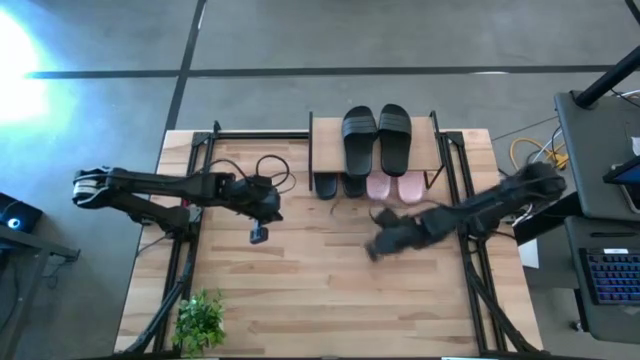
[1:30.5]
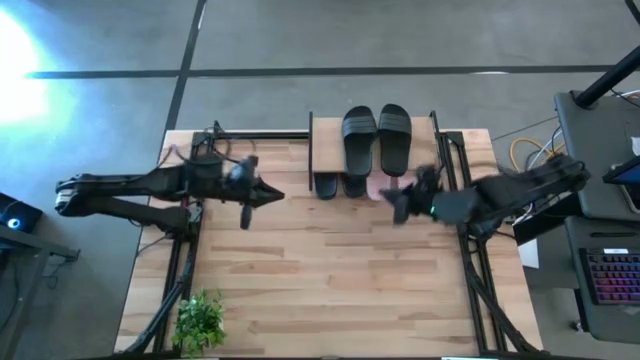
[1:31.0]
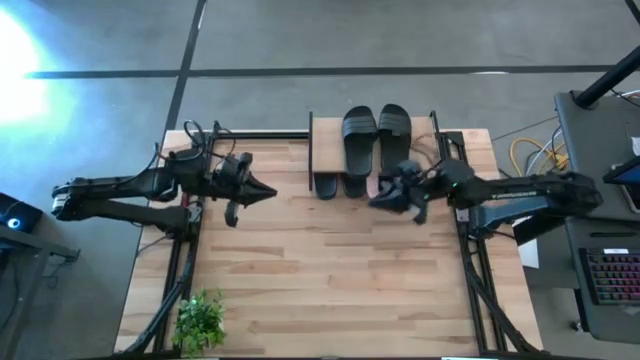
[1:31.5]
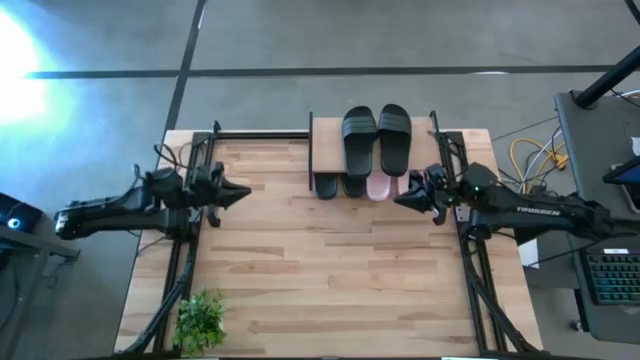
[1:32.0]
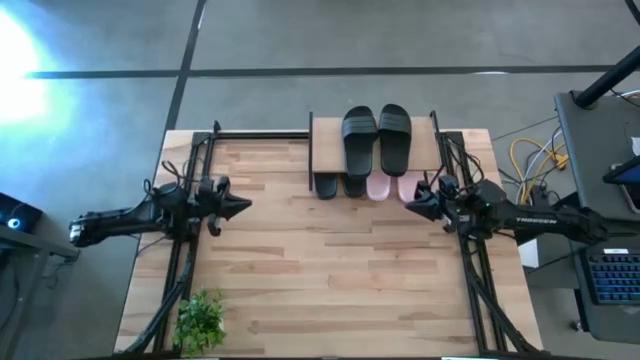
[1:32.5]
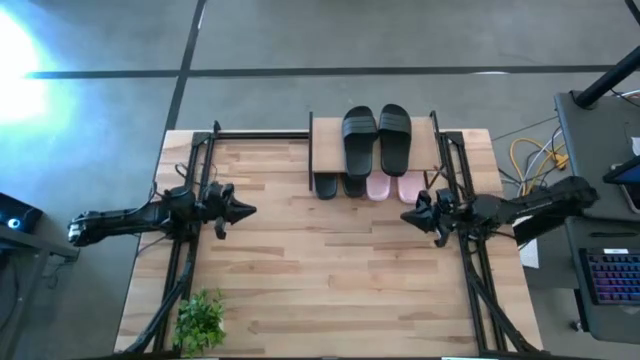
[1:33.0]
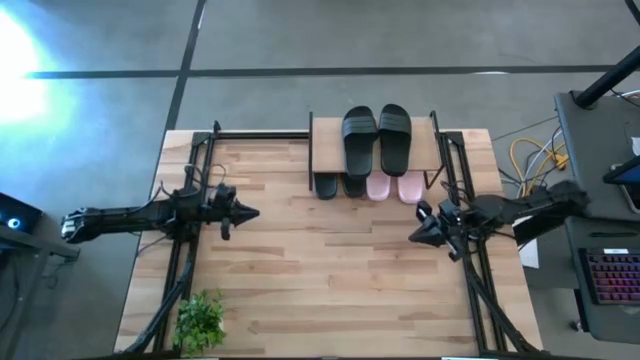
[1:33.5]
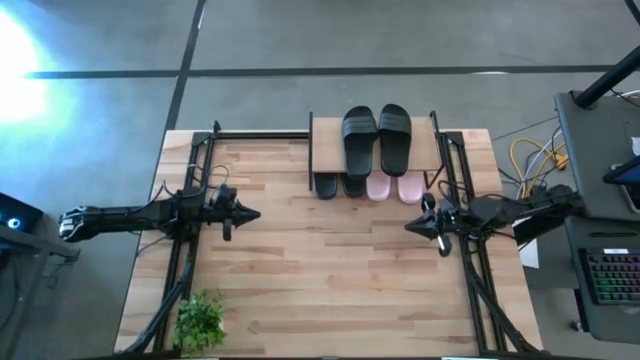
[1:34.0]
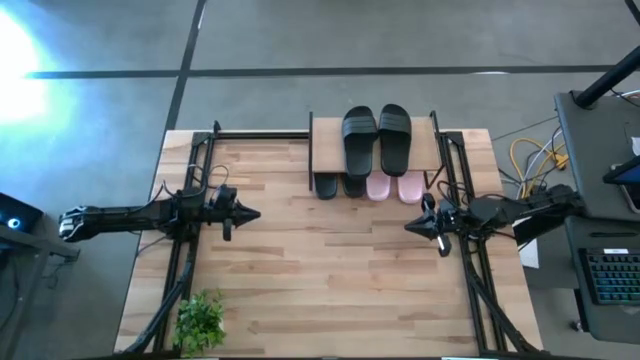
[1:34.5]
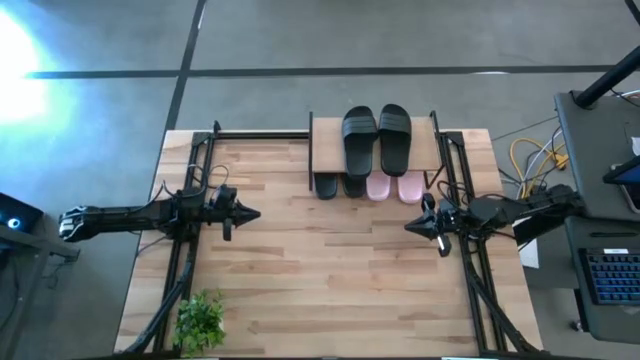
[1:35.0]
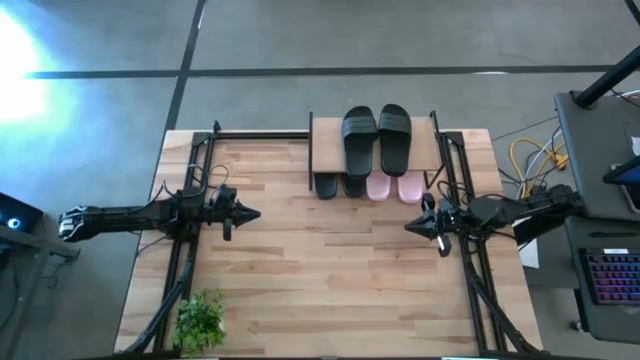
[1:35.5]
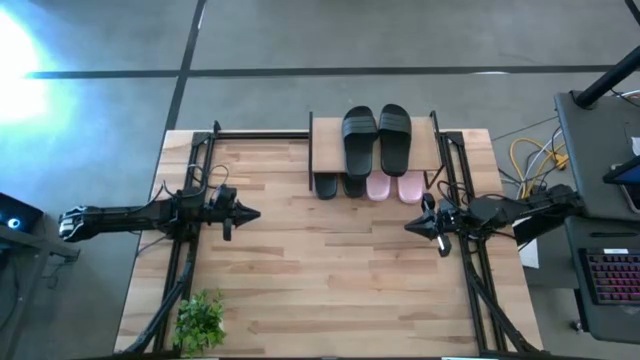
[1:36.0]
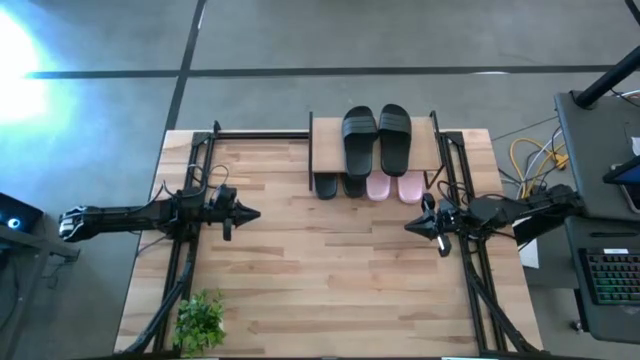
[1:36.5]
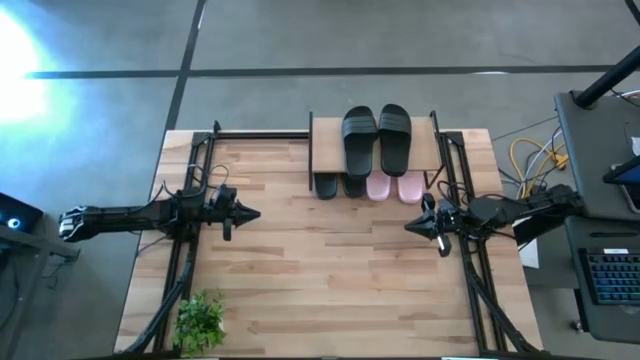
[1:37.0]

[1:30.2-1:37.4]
Task: Pick and place slides into the shelf
Return to Home Position

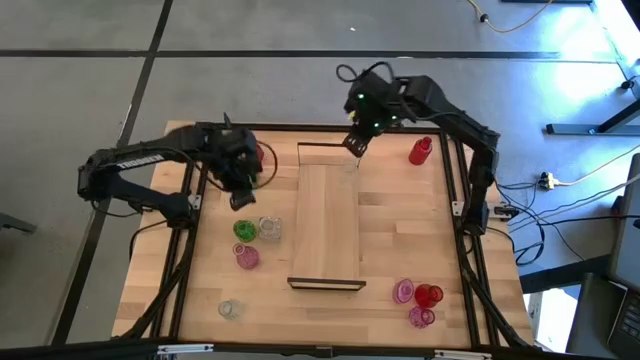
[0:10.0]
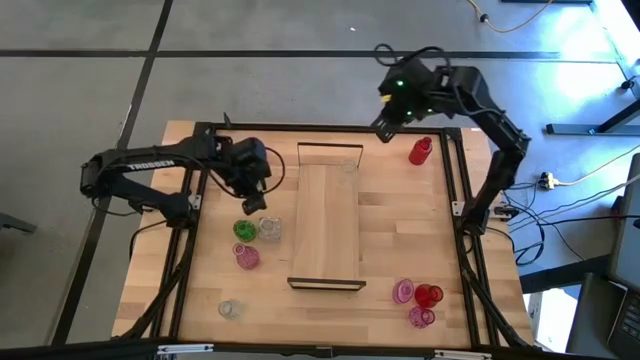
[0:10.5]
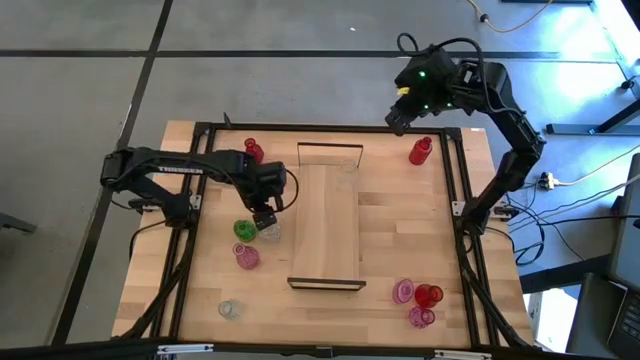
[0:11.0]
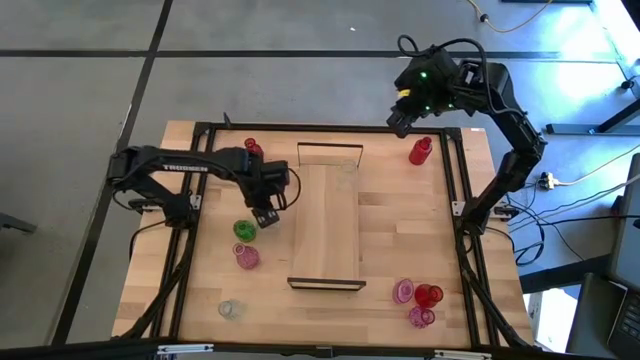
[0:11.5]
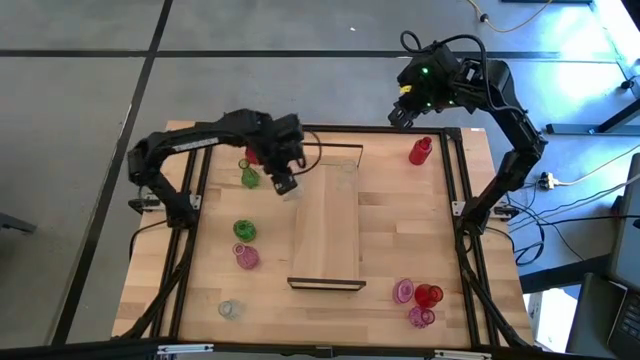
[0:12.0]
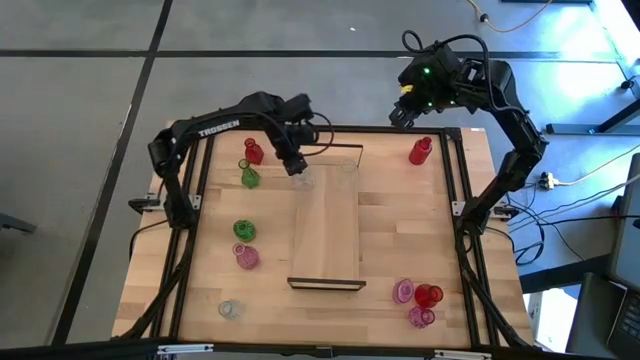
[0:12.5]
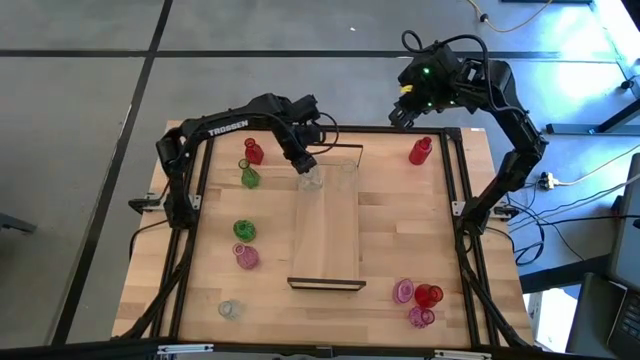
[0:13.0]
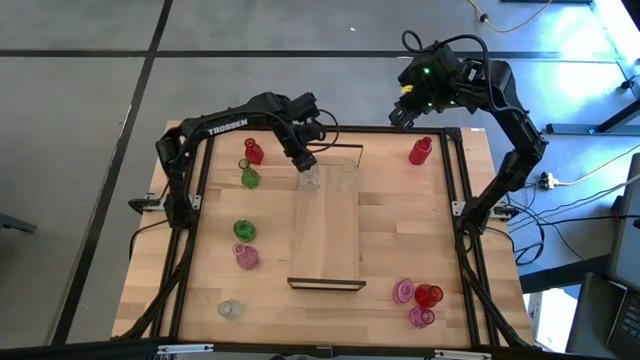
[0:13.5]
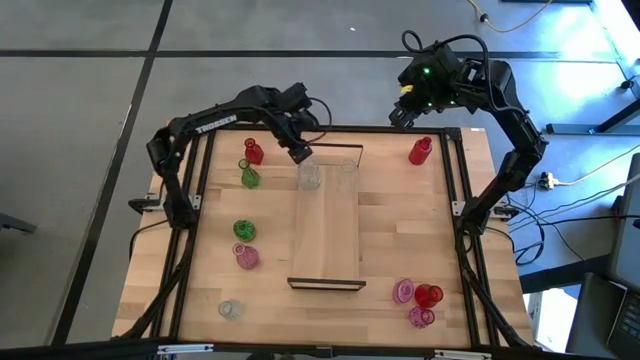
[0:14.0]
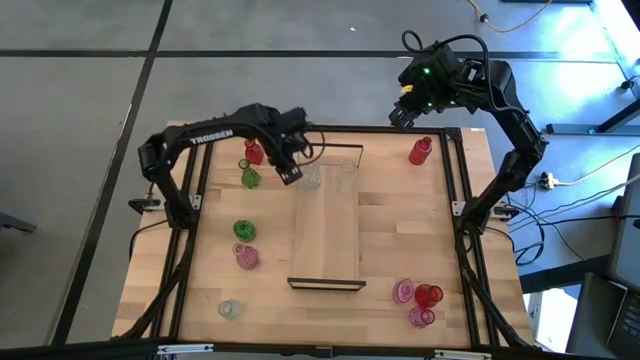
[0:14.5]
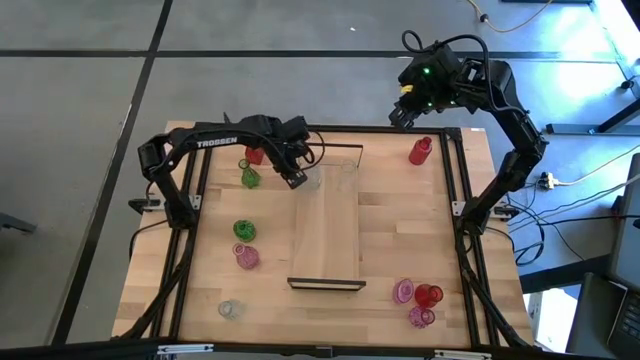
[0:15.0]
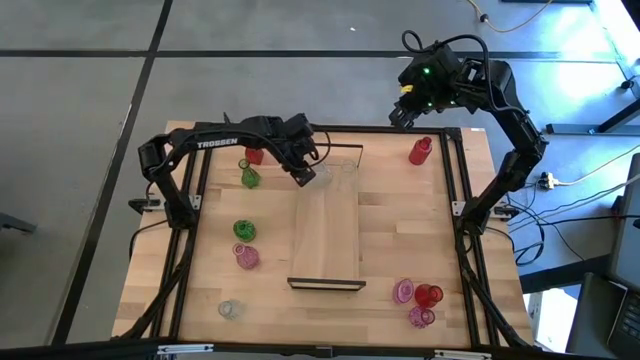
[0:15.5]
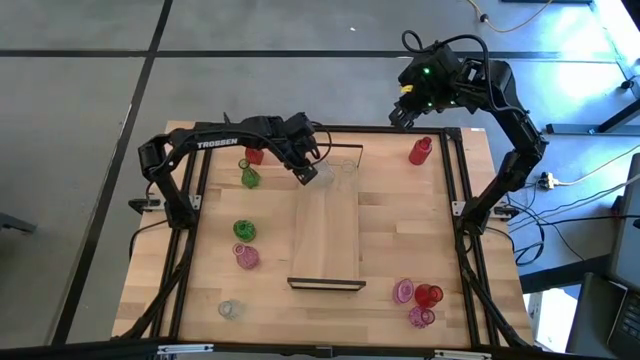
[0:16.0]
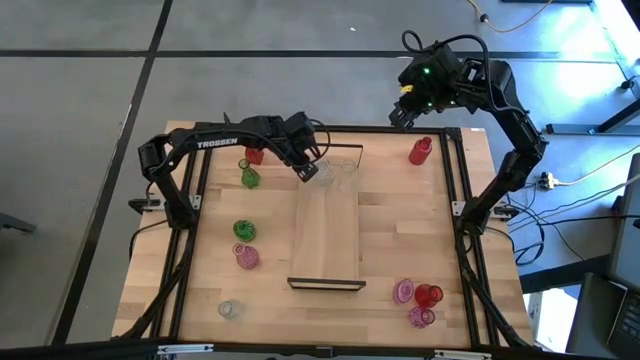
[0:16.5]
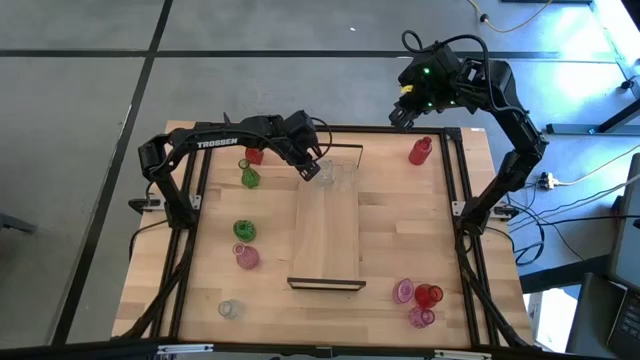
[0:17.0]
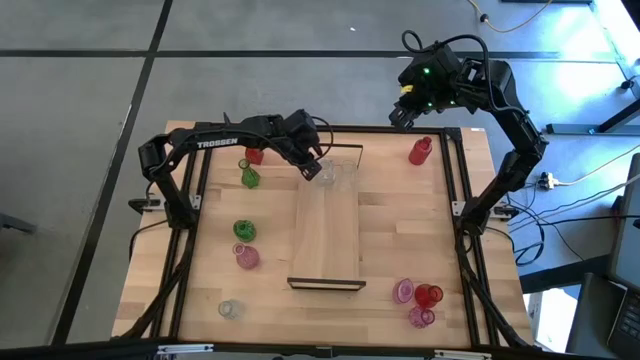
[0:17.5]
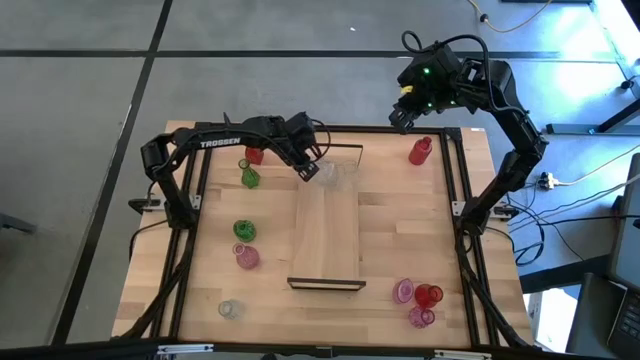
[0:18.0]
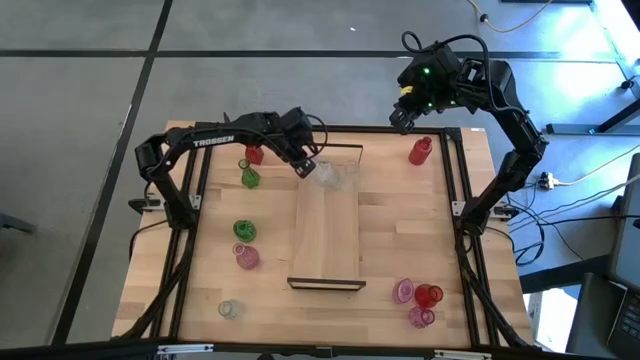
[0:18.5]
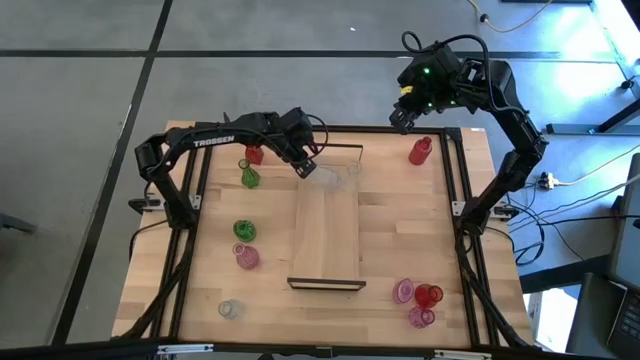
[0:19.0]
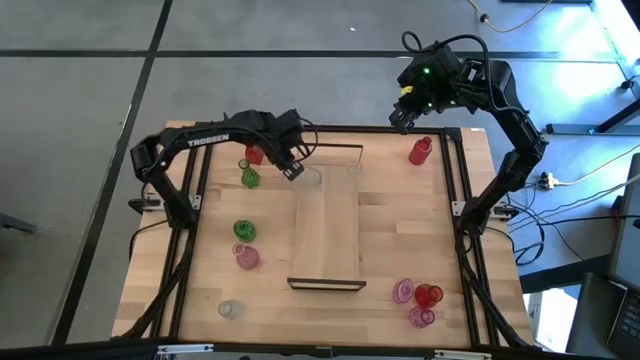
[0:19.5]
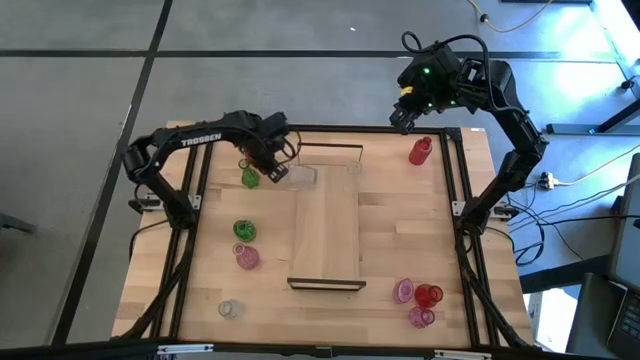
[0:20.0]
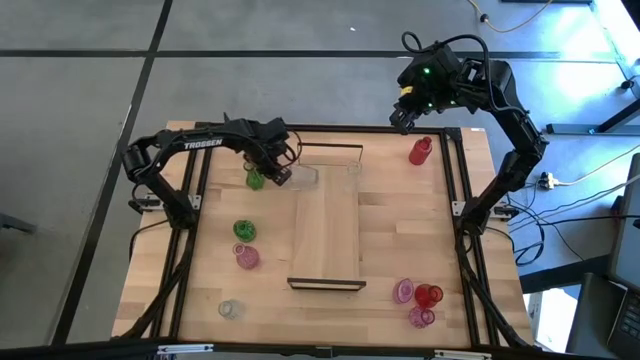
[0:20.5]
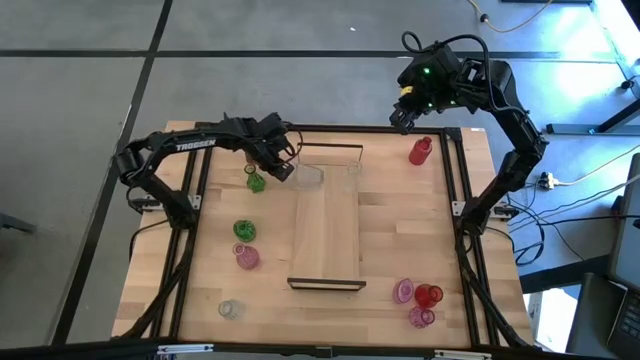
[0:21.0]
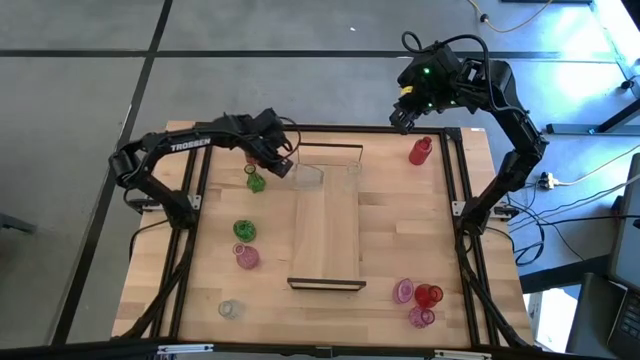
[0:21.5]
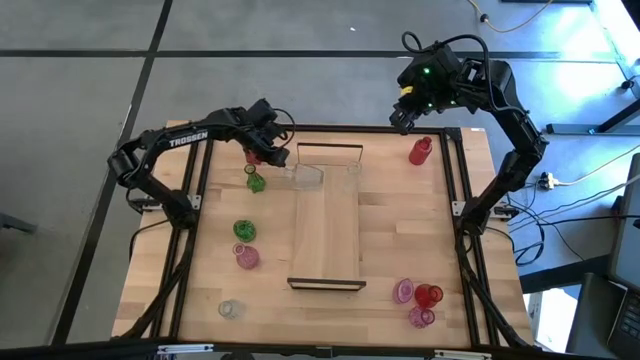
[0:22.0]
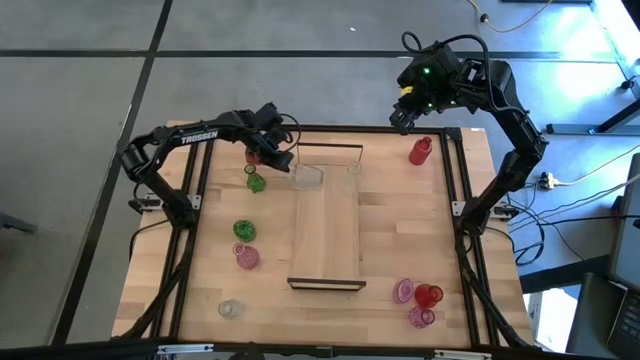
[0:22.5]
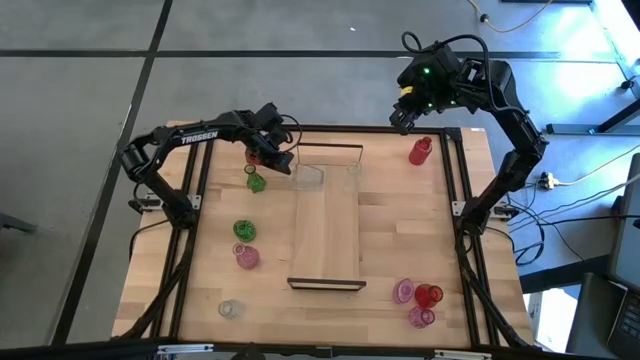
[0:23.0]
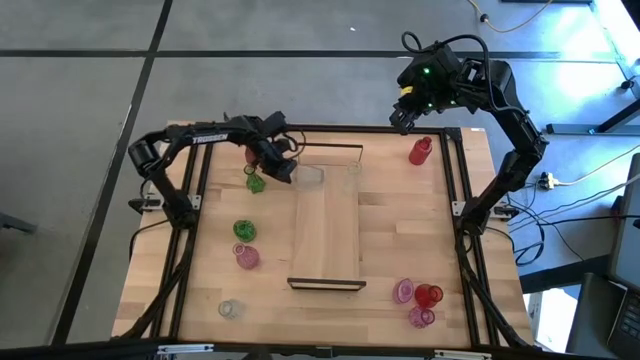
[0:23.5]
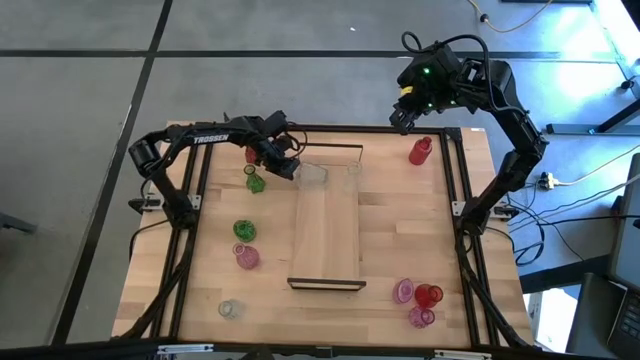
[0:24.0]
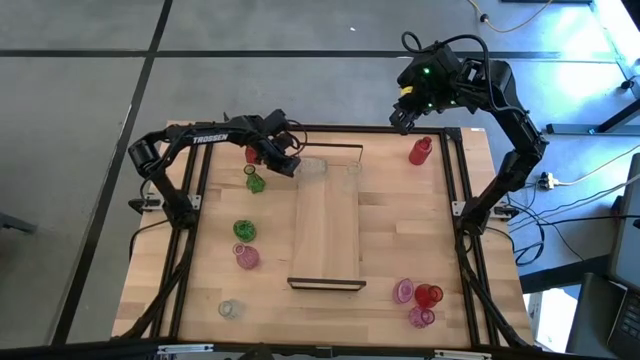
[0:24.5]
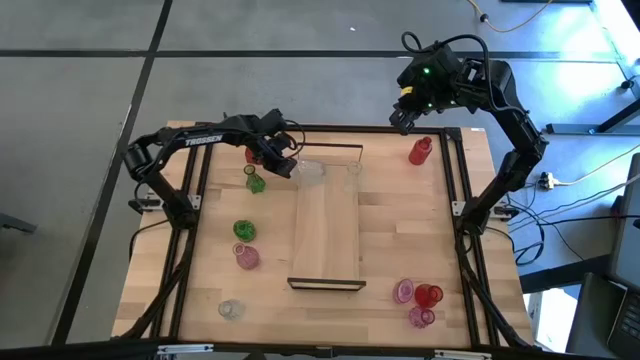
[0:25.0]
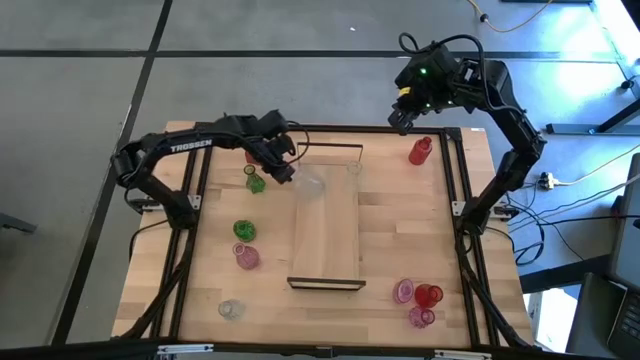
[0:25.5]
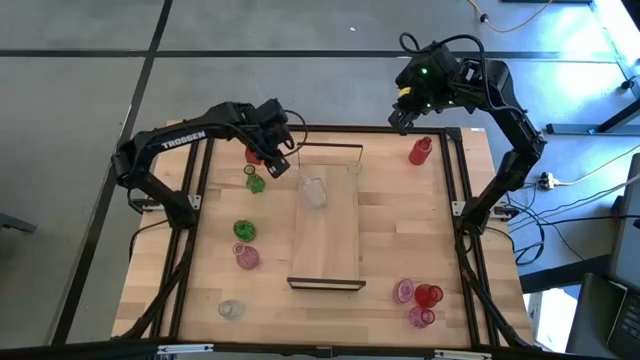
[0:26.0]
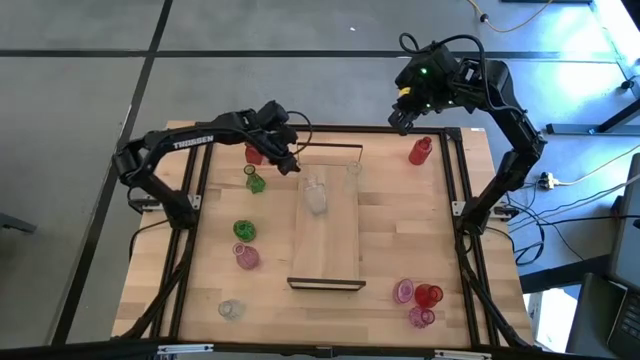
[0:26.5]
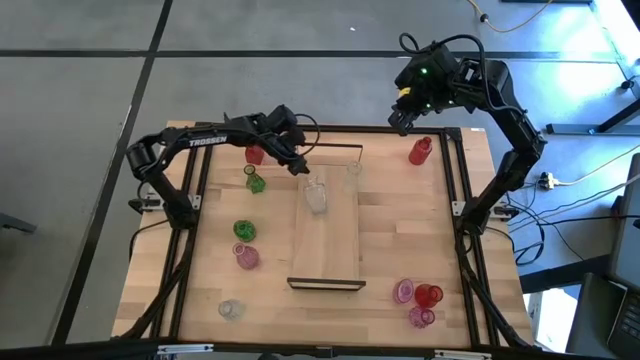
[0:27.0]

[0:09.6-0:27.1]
Task: sort vases onto shelf
Put the top transparent vase aligned with the other transparent vase on the shelf
